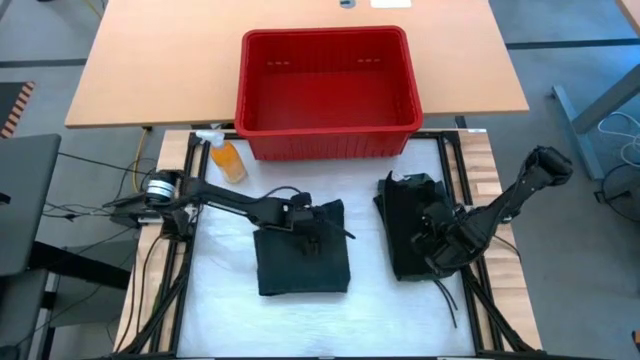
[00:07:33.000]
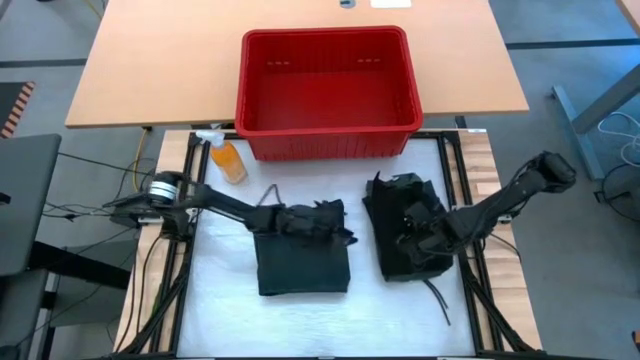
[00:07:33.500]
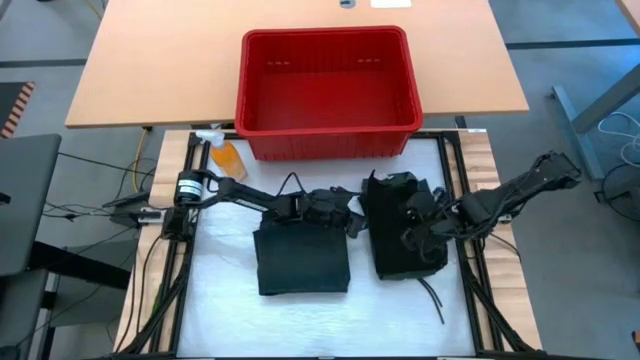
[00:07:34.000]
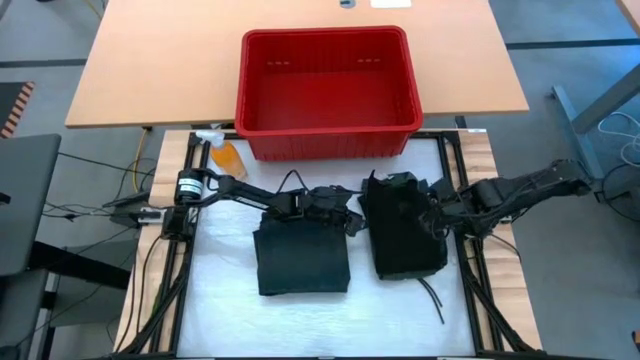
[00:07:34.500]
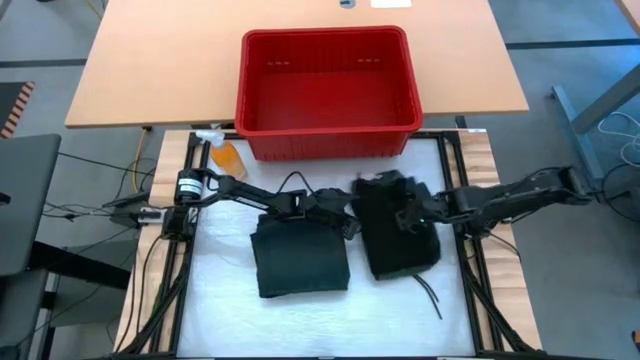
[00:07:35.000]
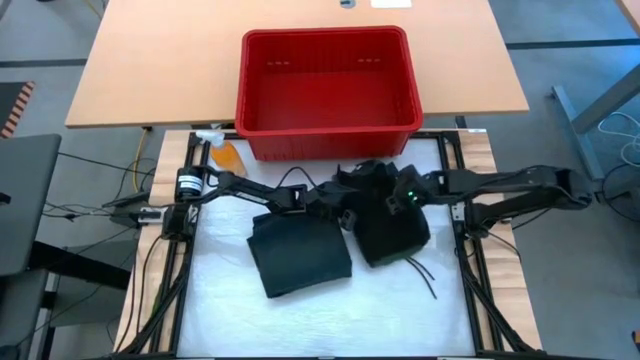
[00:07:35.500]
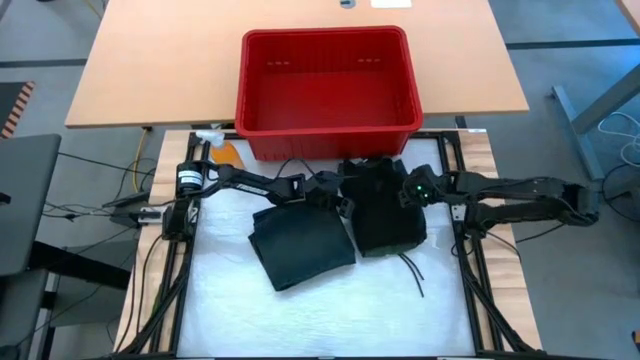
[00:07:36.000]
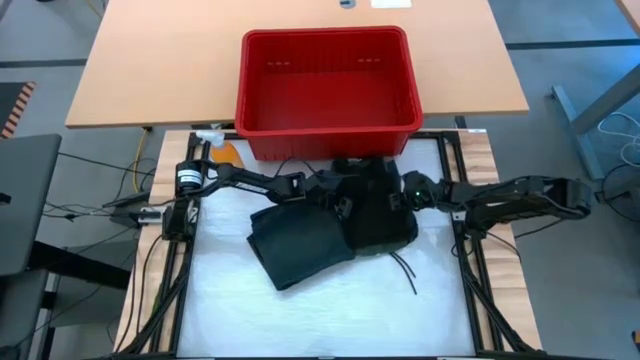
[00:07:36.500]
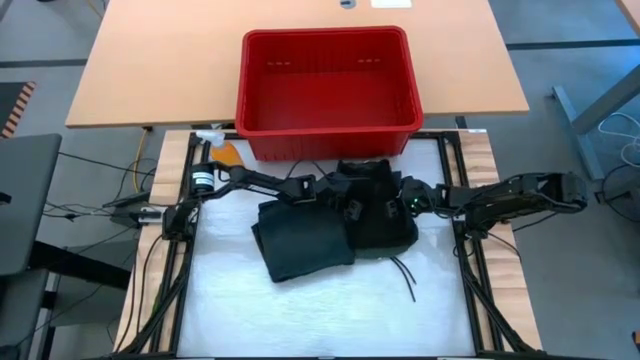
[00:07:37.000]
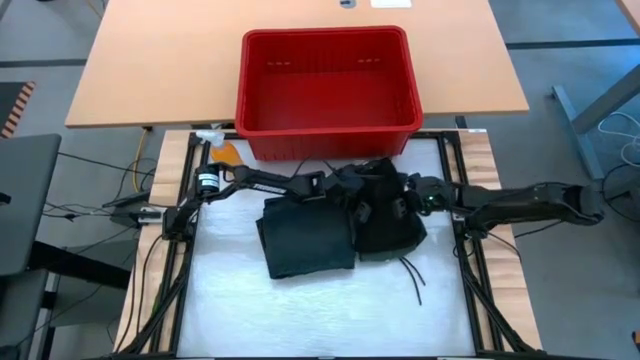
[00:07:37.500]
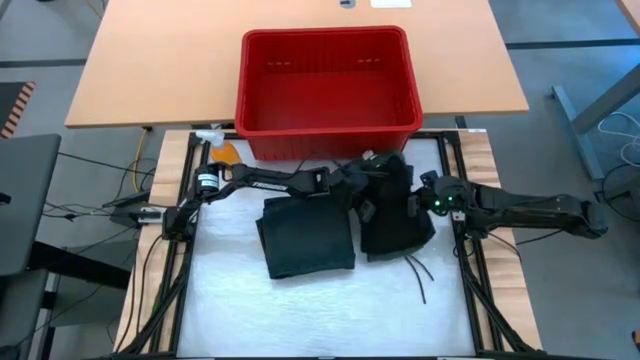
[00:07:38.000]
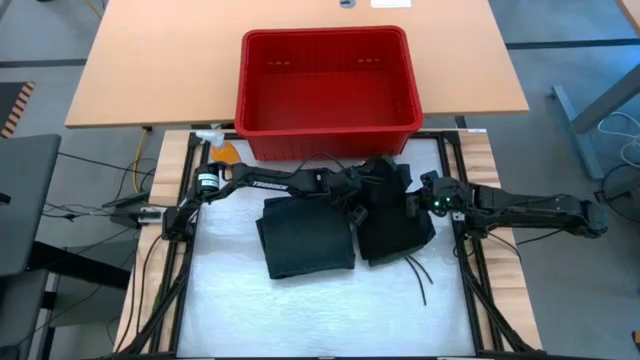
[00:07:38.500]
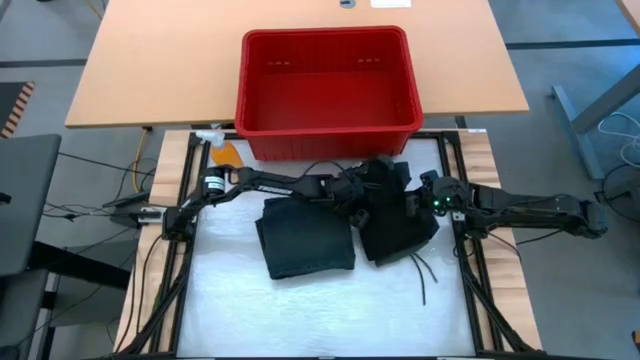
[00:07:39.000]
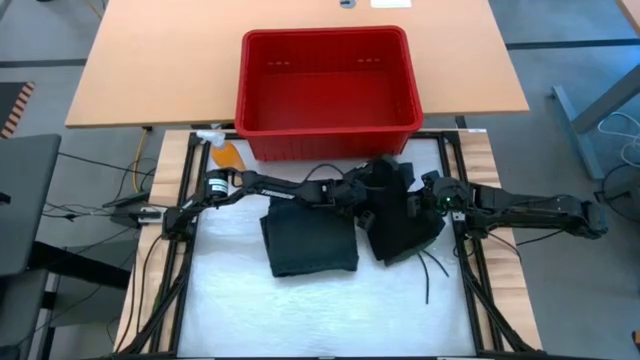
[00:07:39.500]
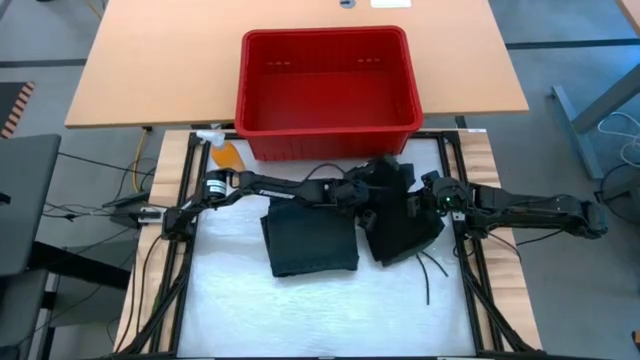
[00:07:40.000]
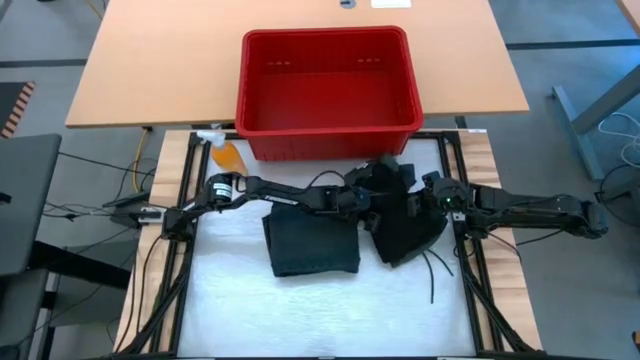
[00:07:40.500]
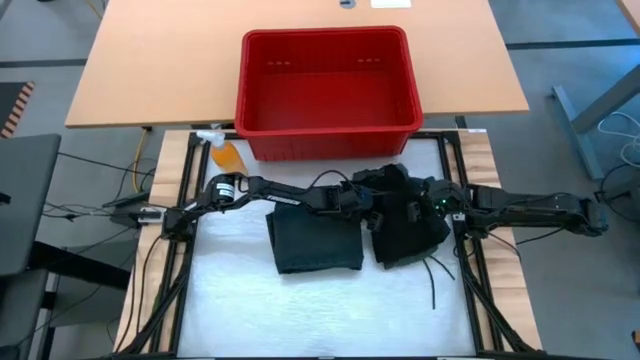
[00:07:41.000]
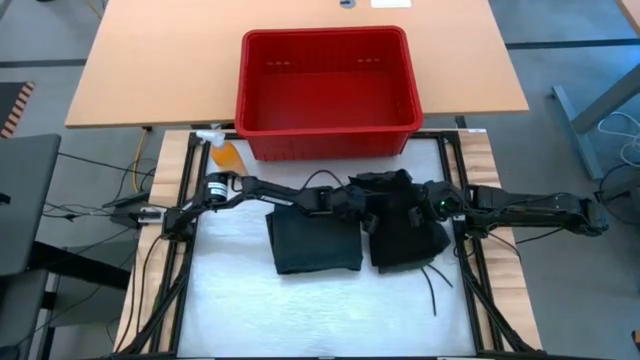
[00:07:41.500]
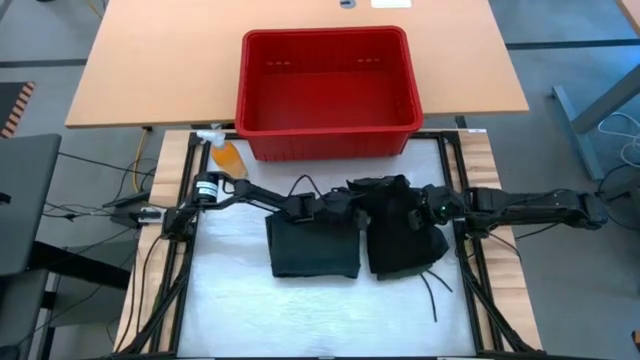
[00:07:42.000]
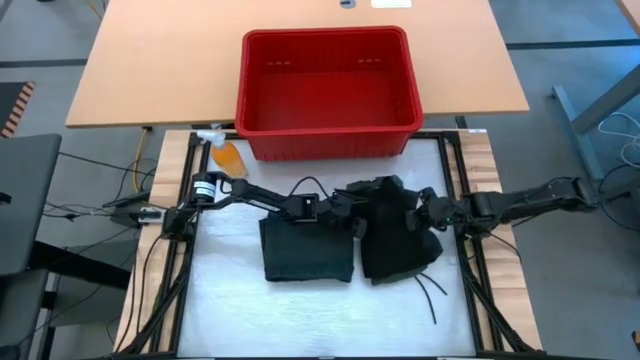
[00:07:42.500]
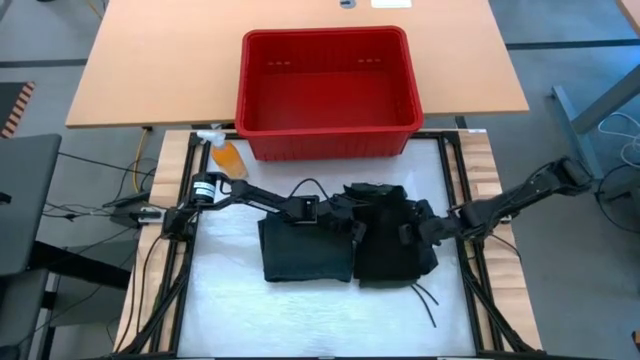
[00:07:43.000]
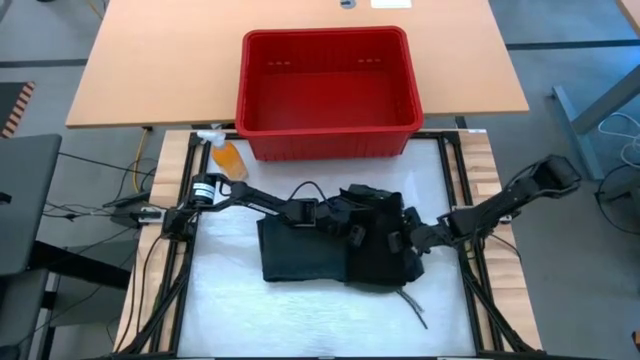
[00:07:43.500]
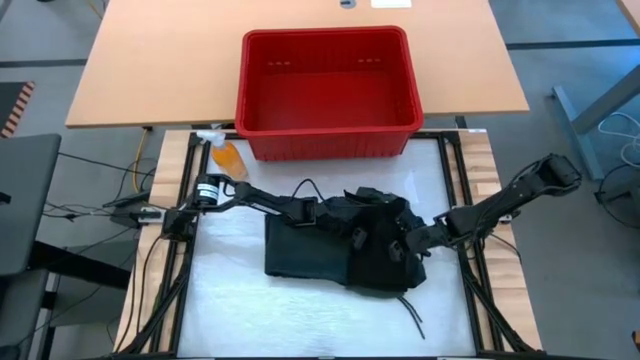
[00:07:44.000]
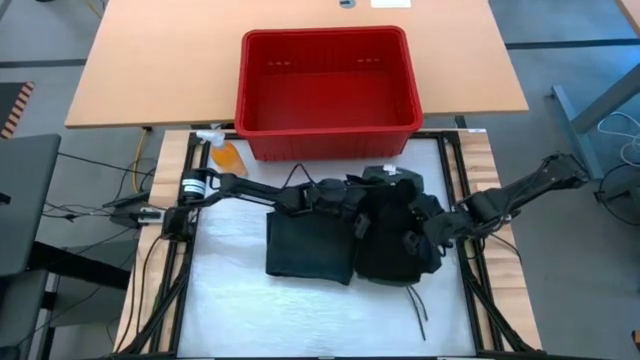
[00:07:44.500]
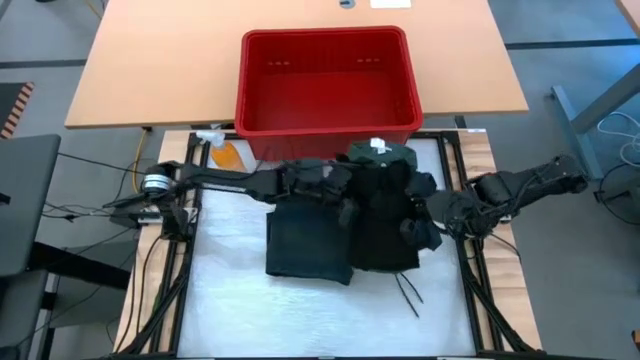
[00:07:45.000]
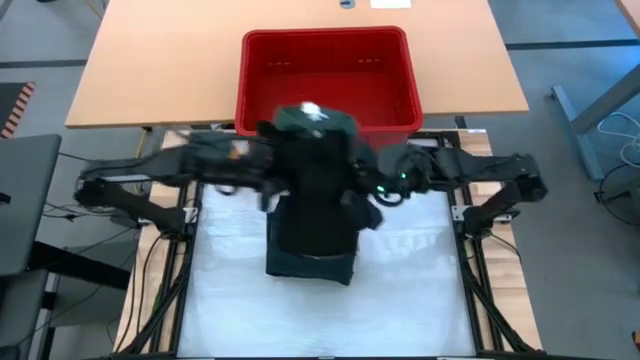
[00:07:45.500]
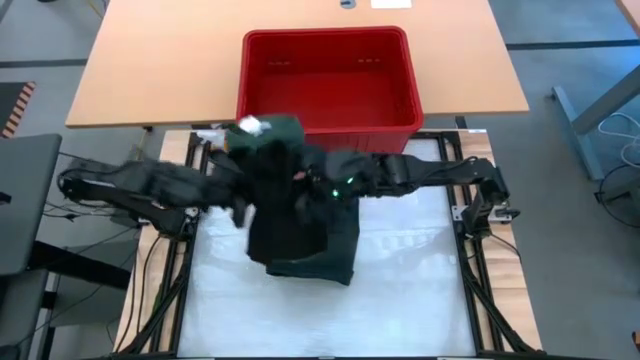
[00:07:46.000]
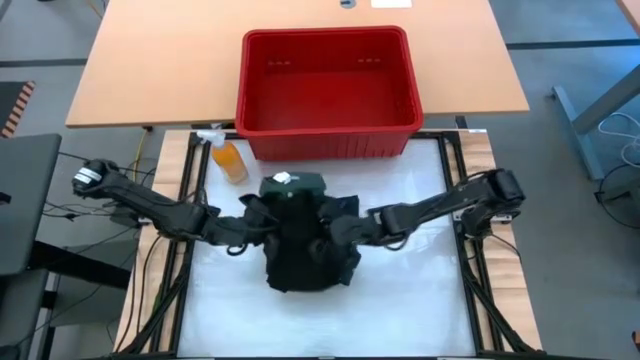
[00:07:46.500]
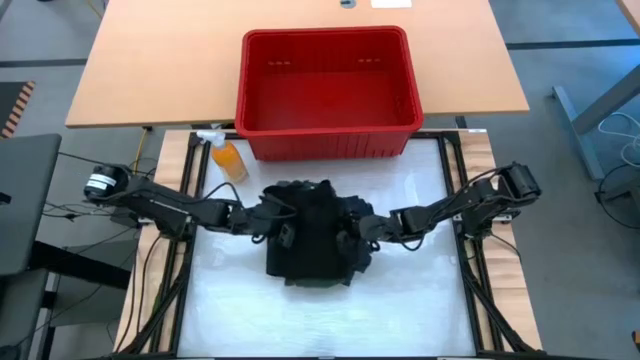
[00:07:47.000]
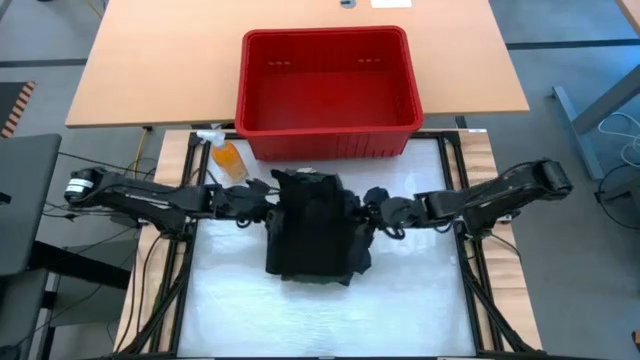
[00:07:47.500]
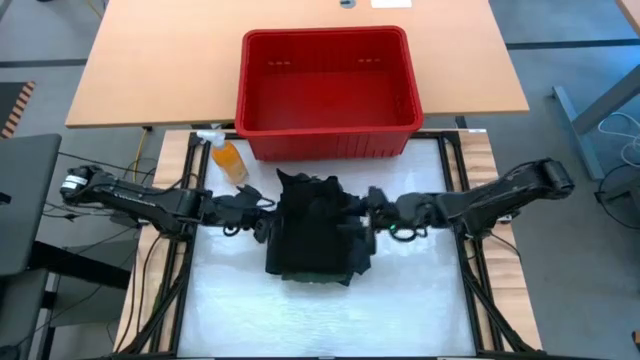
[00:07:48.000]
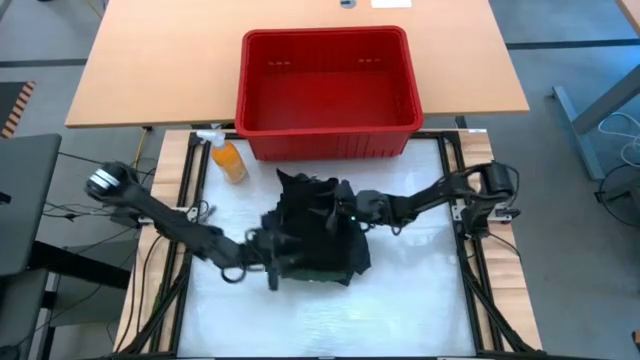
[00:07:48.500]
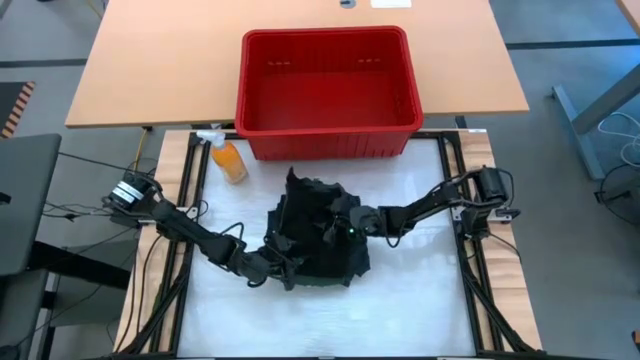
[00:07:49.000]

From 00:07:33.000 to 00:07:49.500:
Task: Fold laundry
Stack the folded clothes on top of the folded dark blue jeans

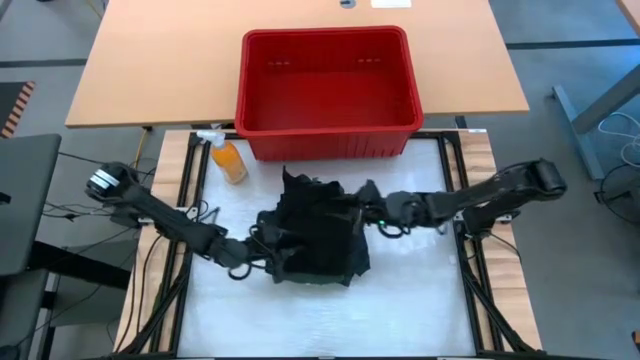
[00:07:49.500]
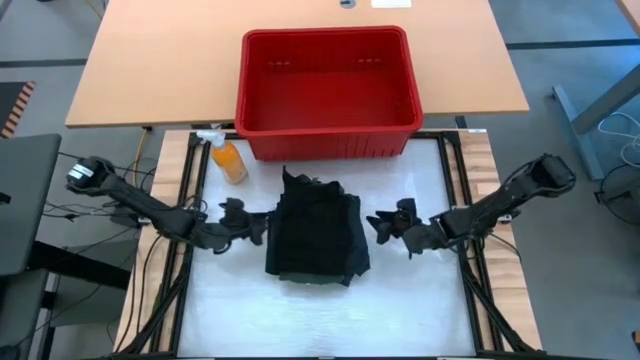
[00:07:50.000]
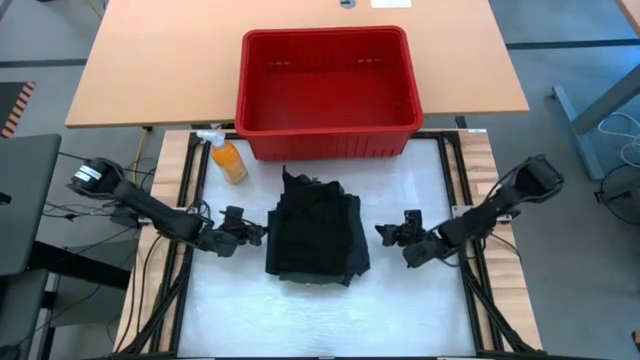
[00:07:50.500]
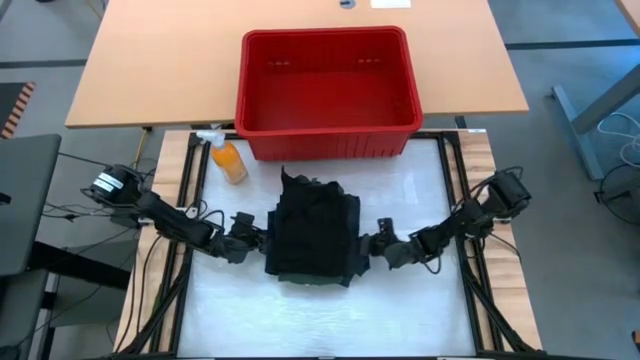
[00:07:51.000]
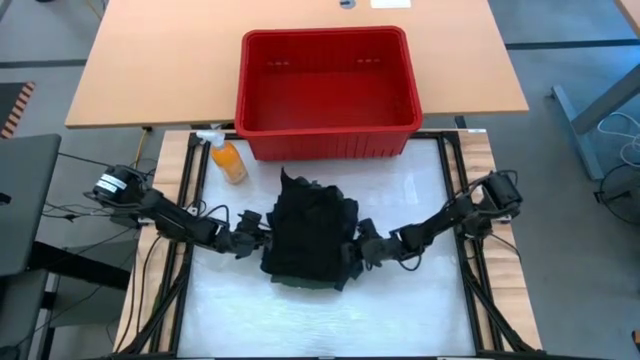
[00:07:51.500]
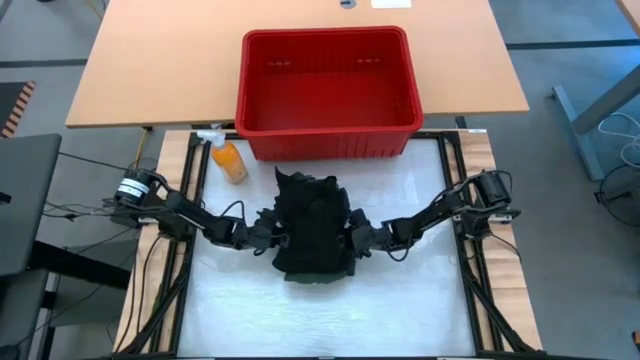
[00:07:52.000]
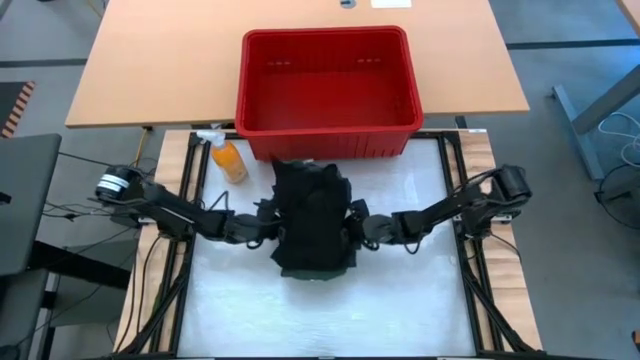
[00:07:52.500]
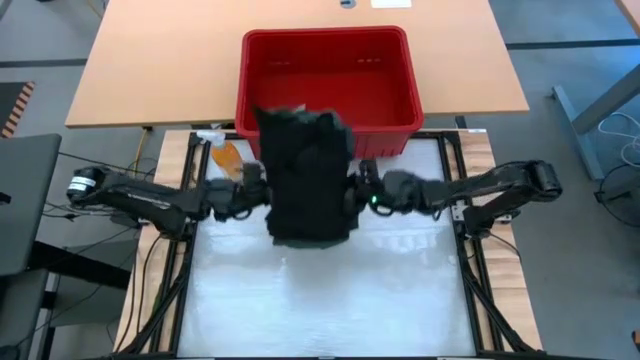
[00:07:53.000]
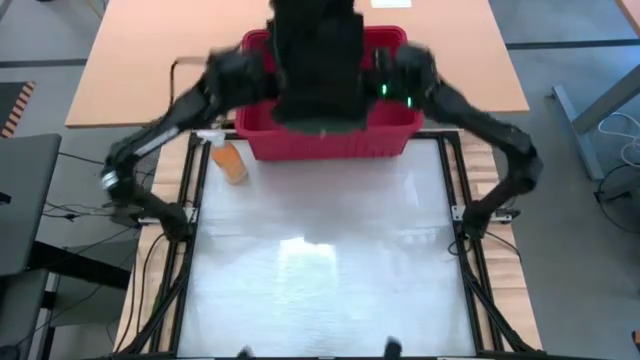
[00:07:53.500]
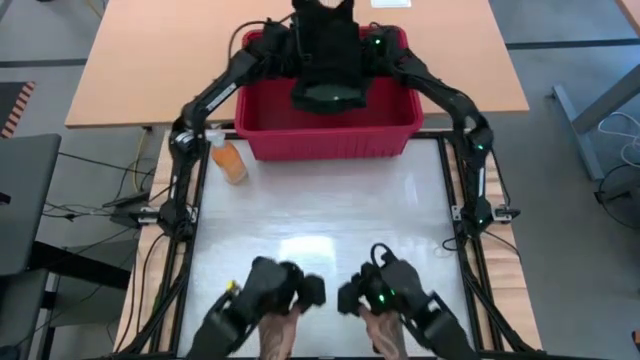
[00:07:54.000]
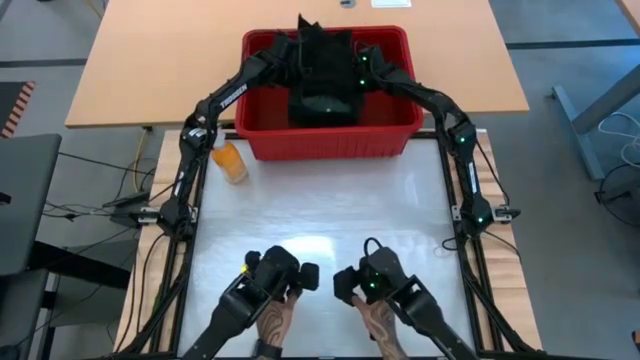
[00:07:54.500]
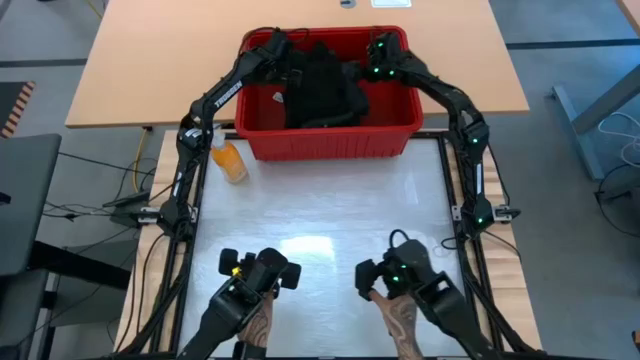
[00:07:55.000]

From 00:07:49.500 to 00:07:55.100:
Put all the stacked clothes into the red bin
